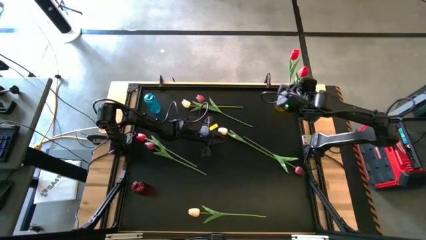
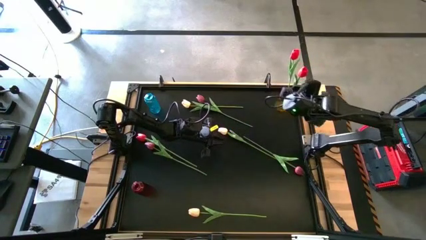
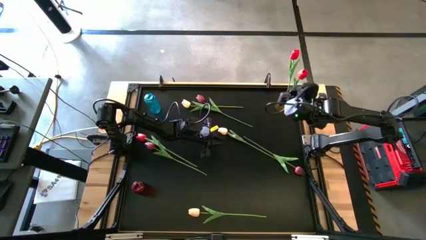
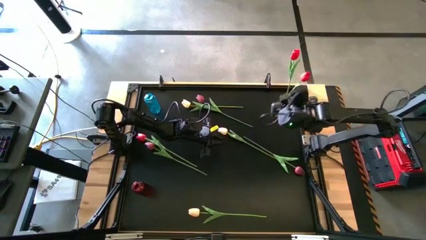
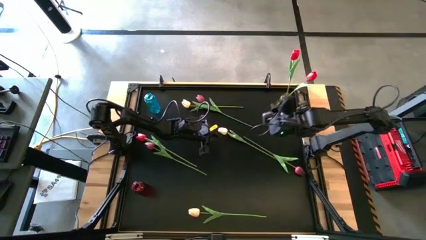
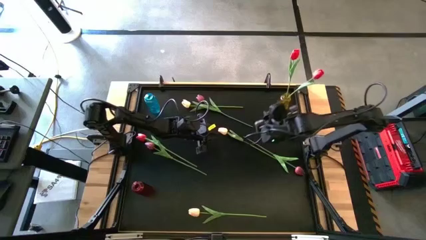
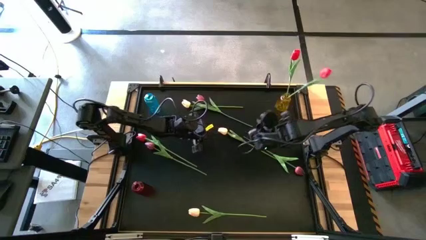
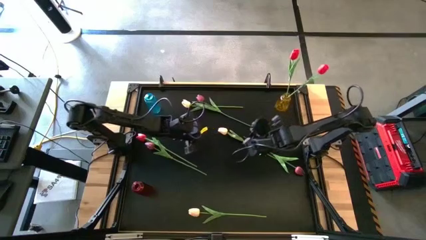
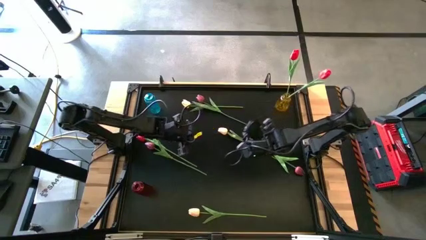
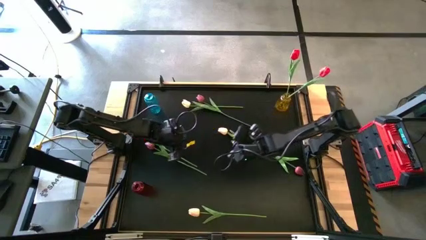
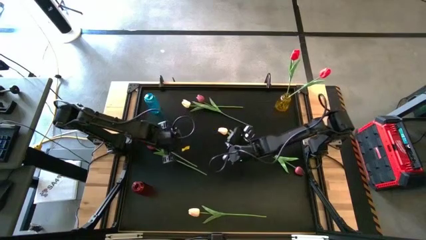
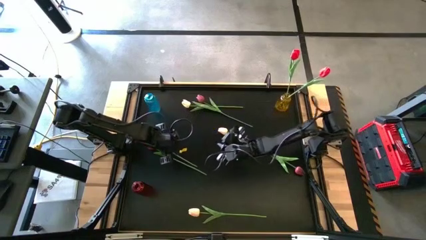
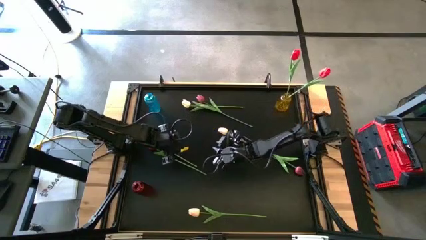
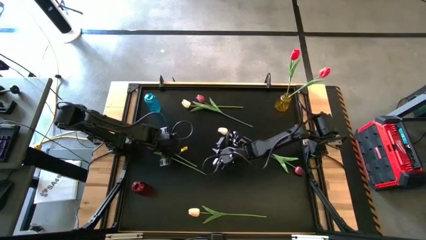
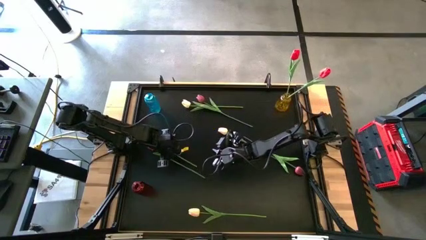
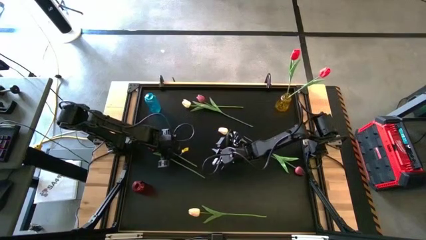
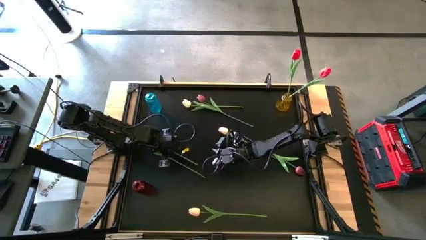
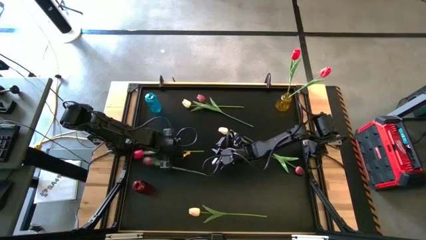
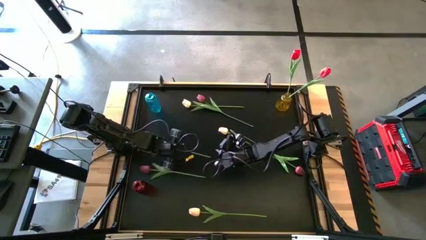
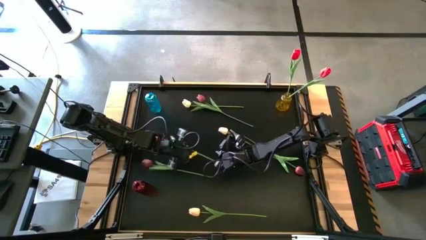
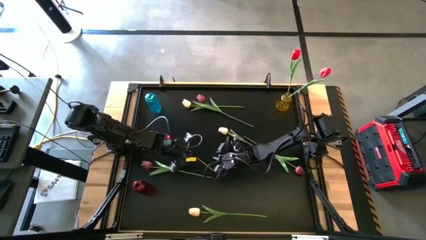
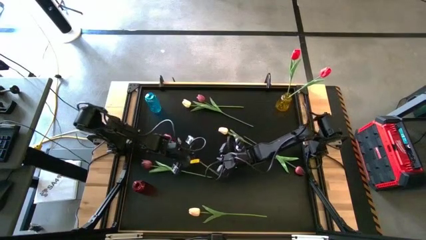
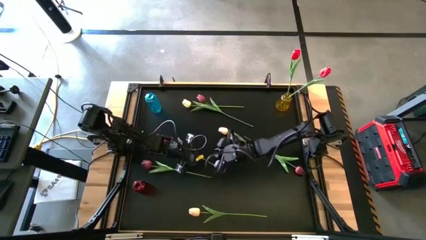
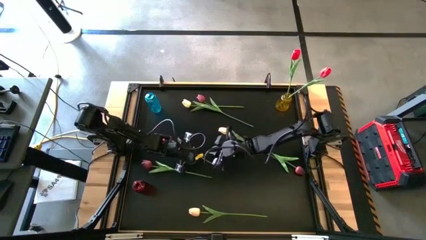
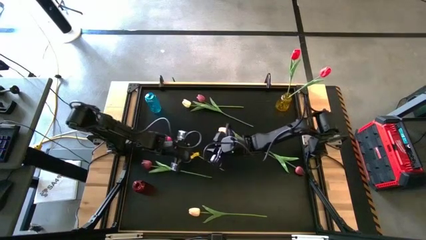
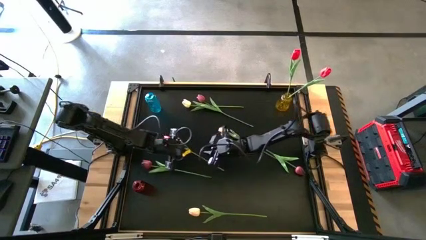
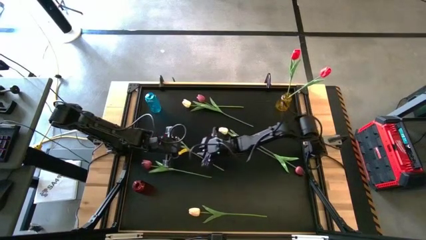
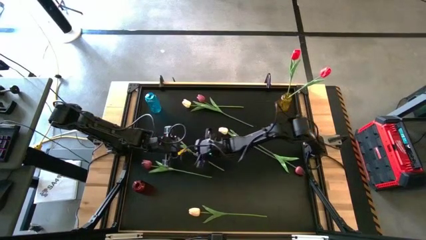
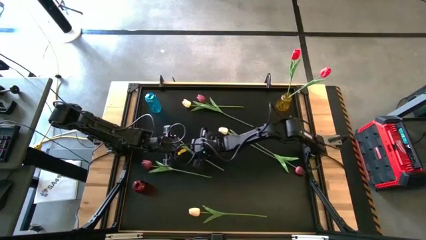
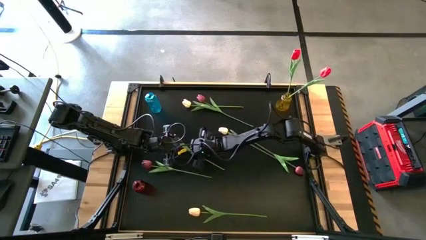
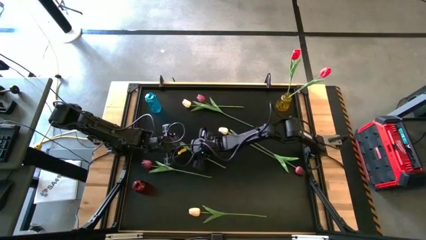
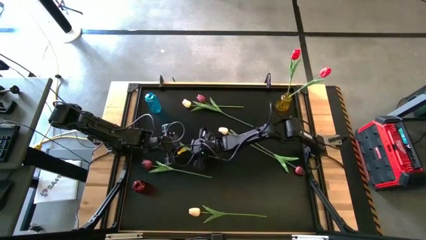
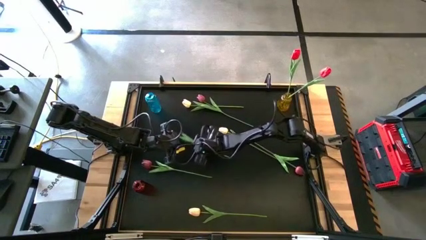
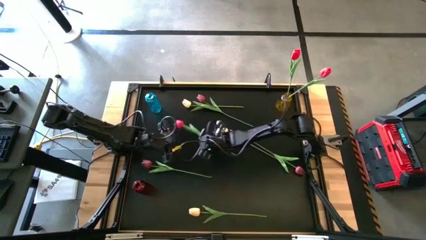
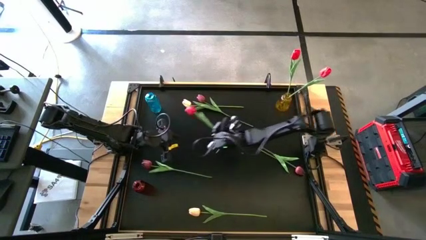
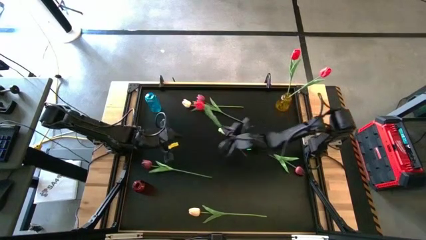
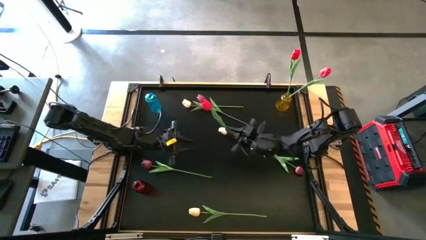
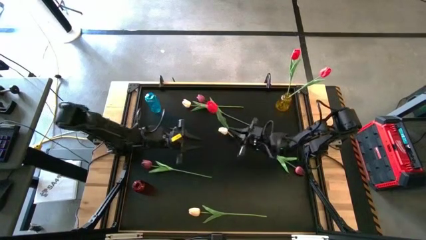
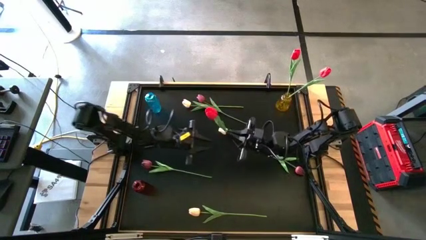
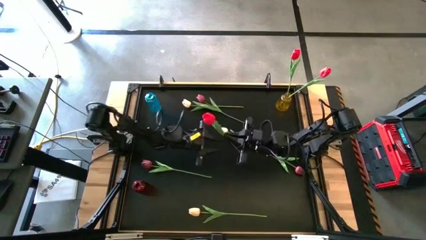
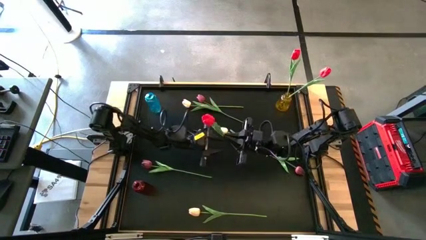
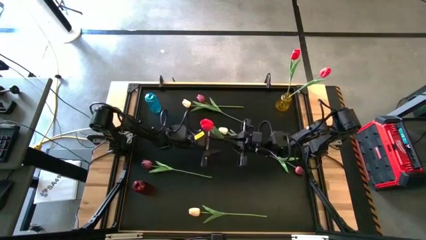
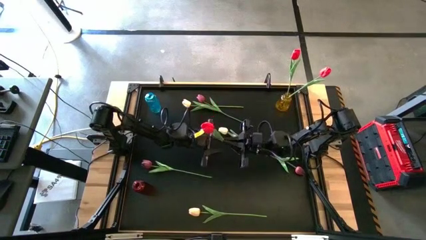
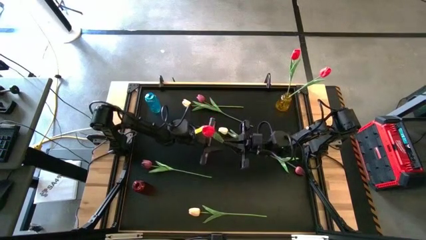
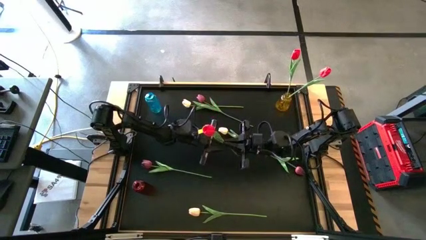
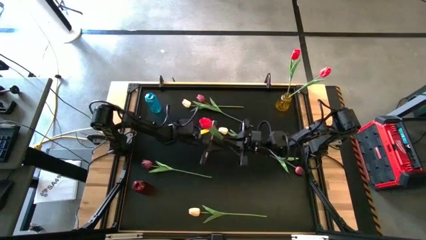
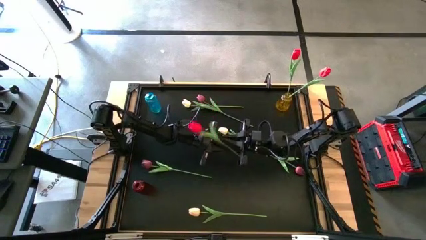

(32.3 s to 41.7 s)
Task: Sort flowers into vase by color
Put the red tulip into the yellow vase

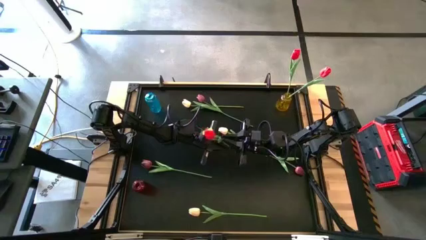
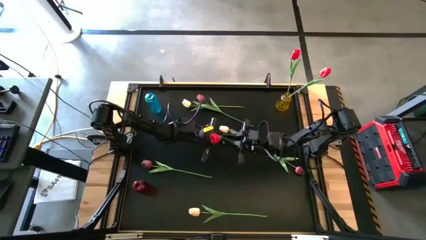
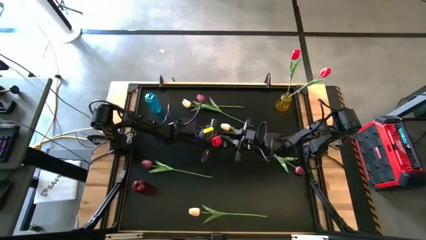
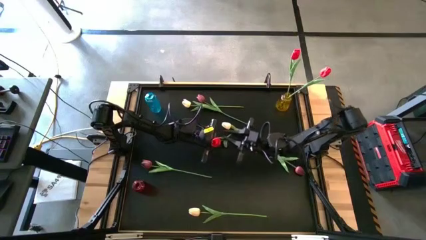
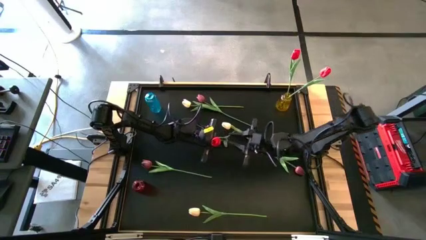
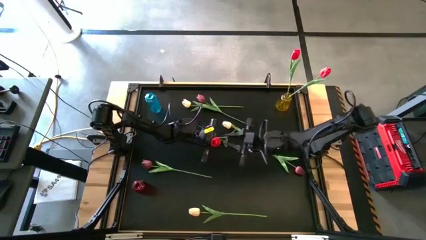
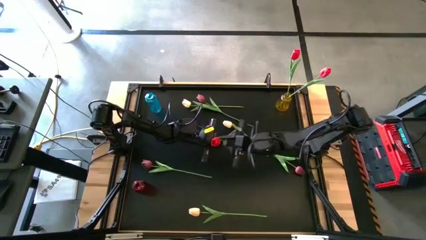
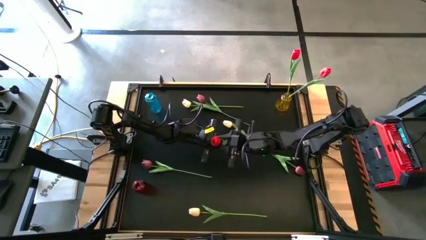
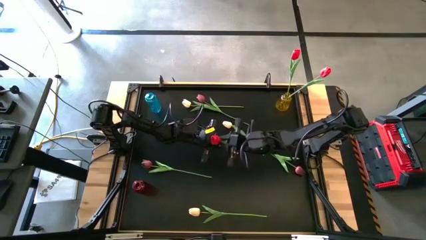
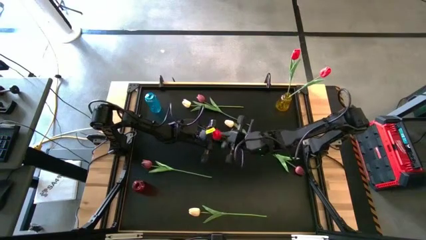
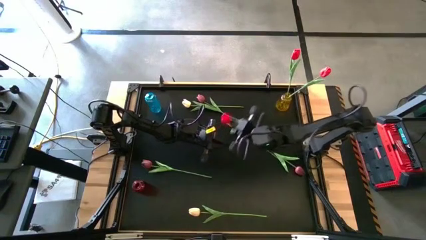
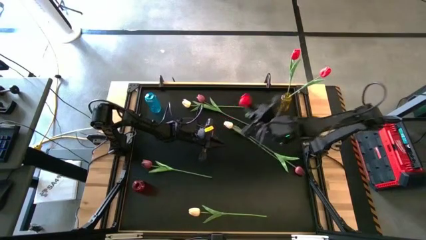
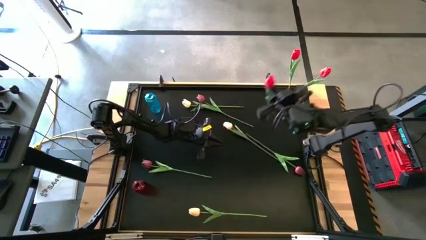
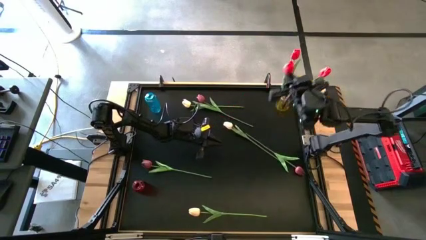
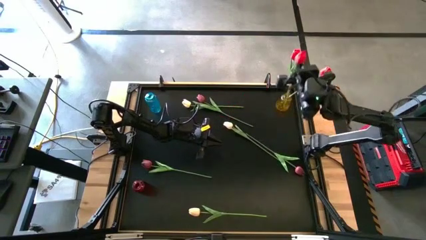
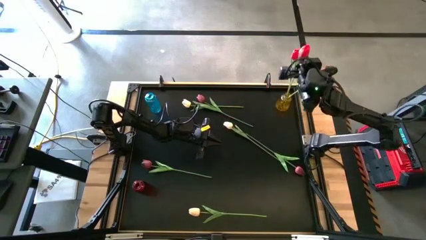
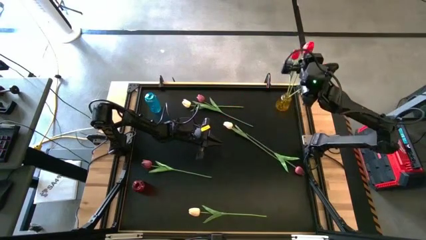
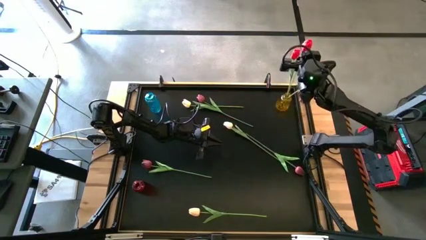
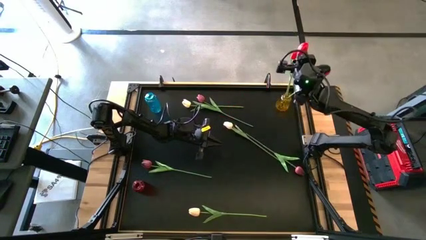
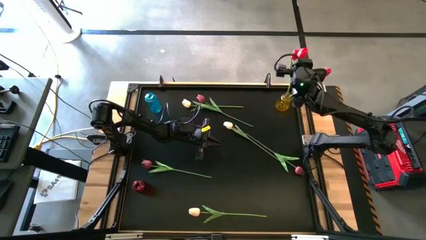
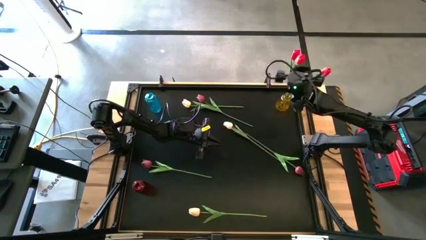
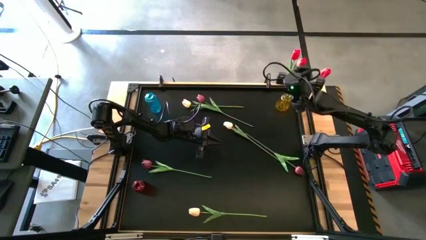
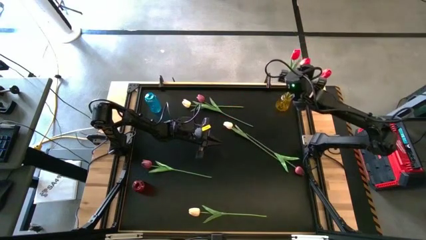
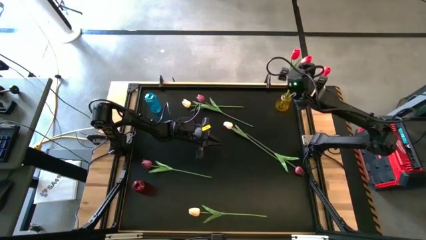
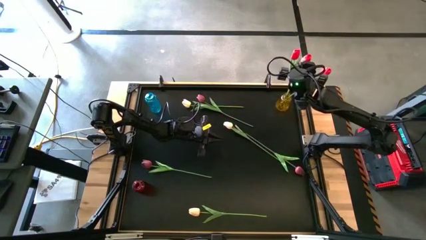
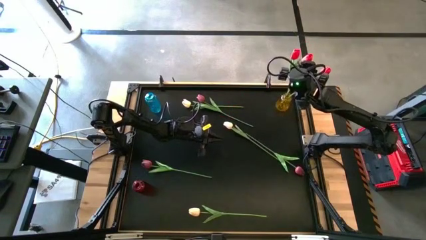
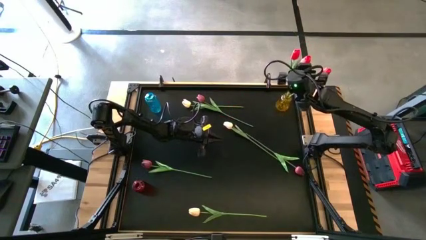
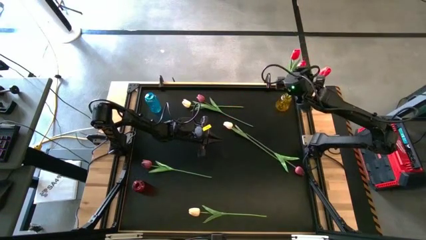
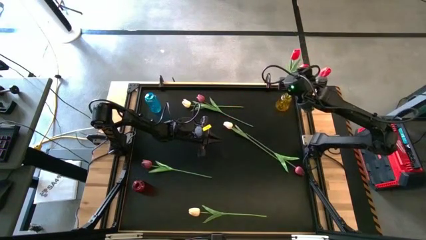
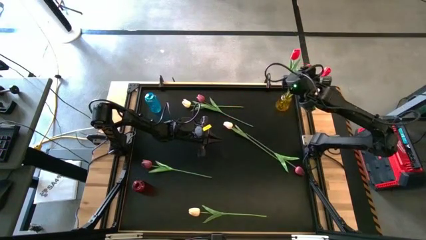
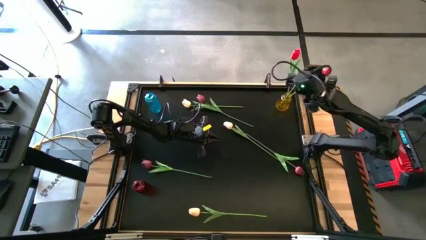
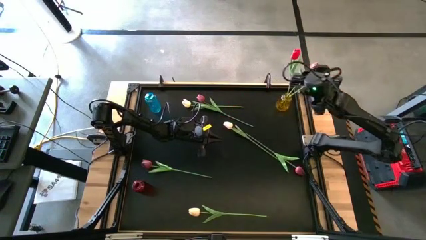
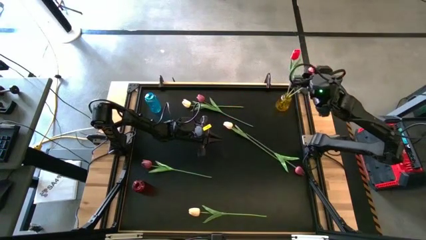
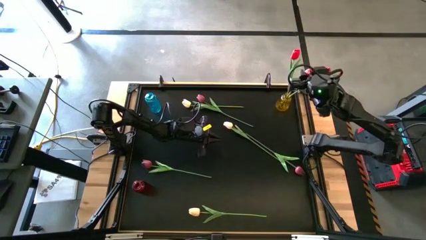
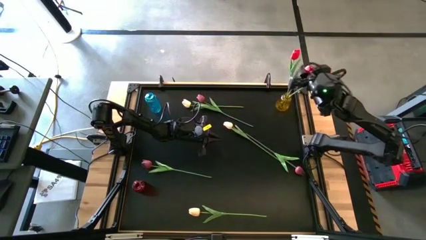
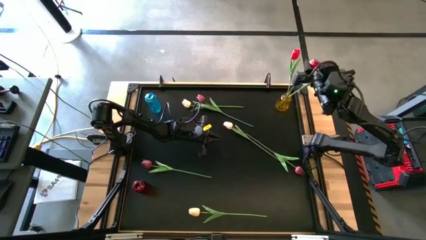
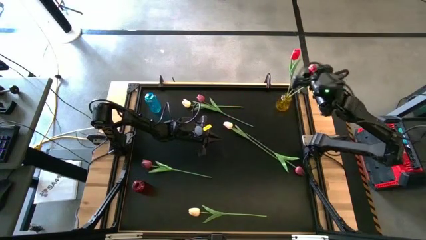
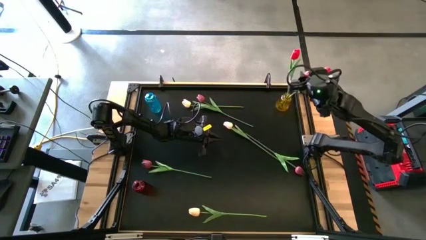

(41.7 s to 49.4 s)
Put the red tulip into the yellow vase
